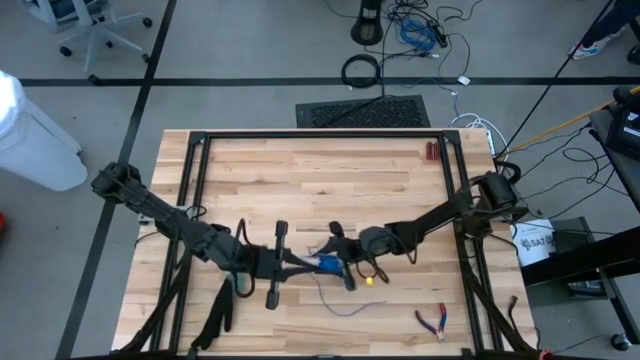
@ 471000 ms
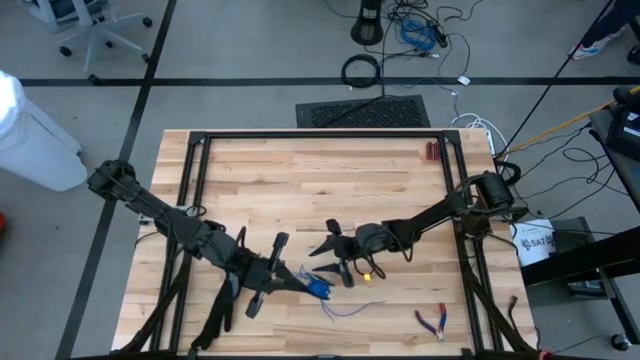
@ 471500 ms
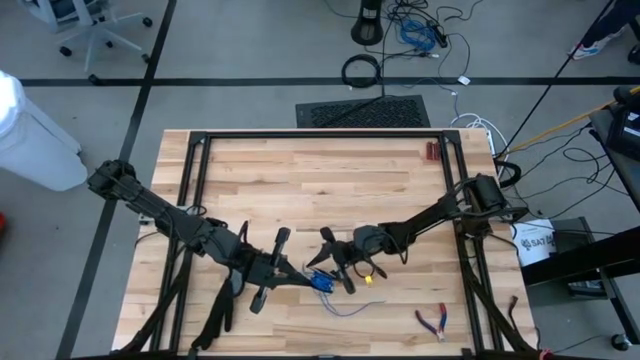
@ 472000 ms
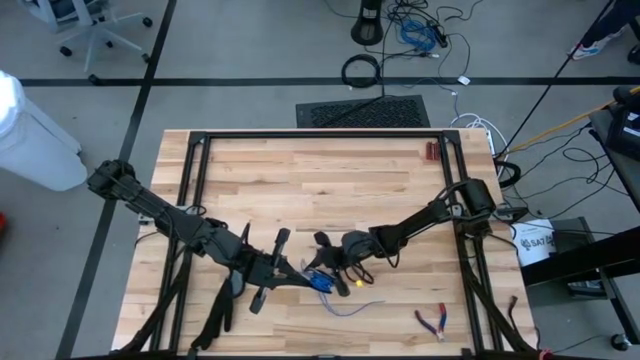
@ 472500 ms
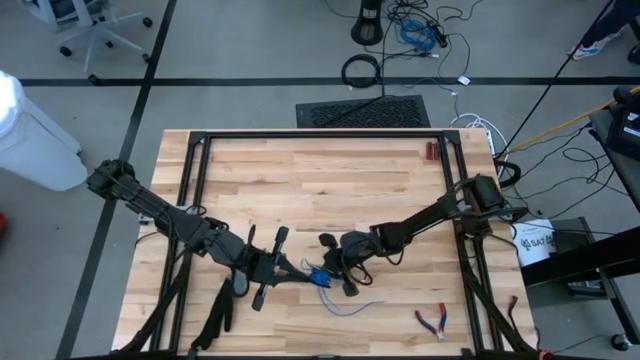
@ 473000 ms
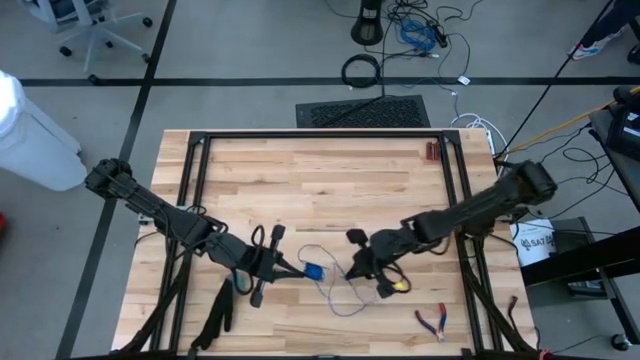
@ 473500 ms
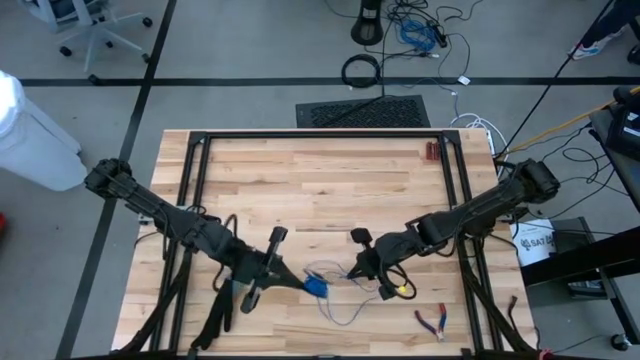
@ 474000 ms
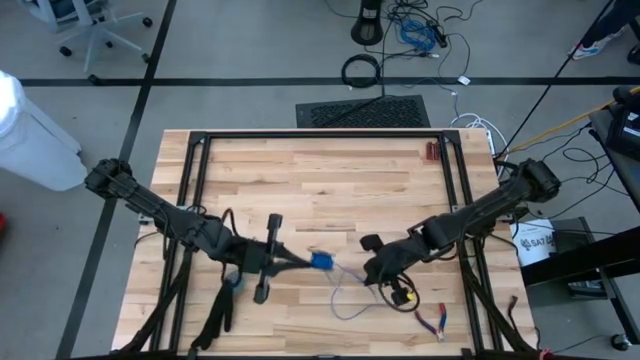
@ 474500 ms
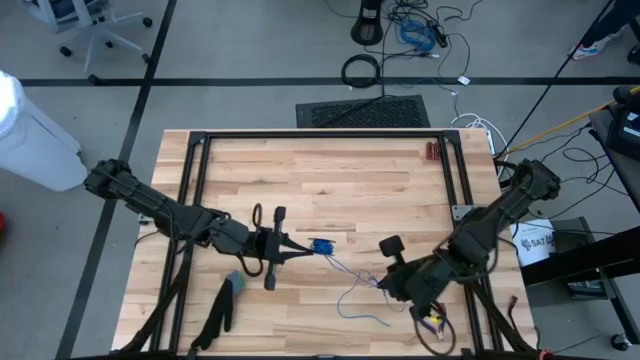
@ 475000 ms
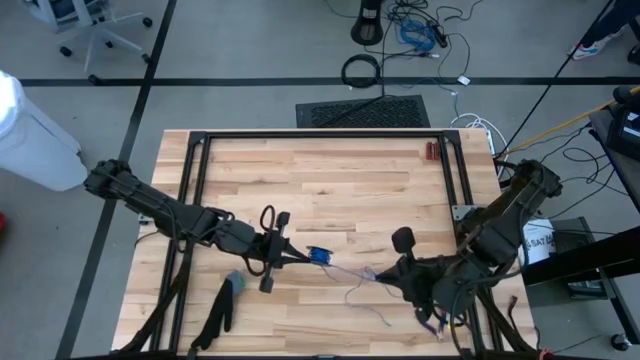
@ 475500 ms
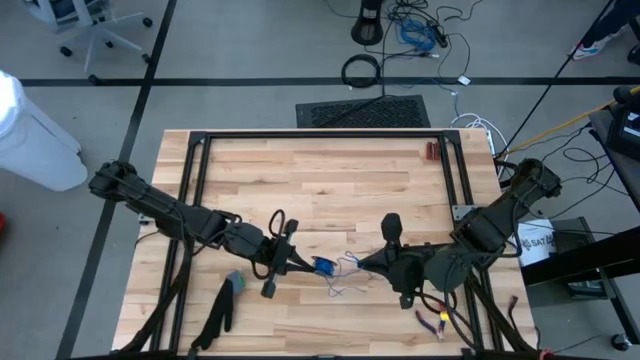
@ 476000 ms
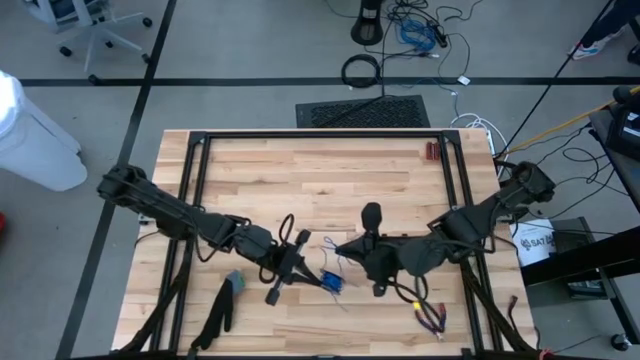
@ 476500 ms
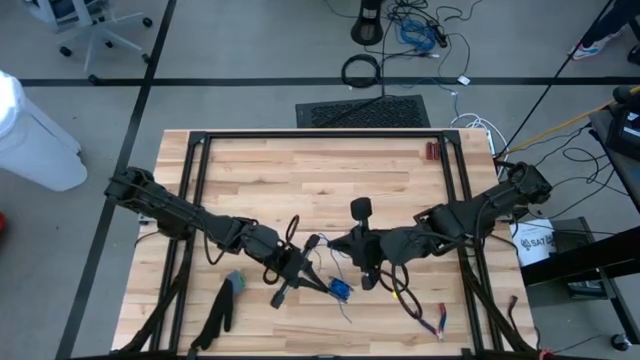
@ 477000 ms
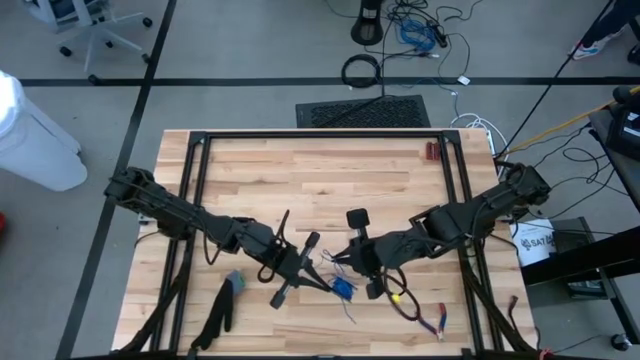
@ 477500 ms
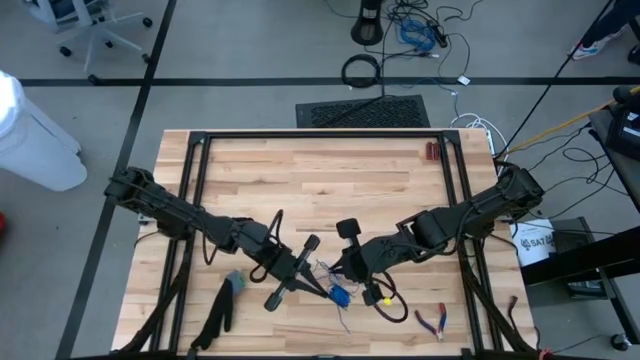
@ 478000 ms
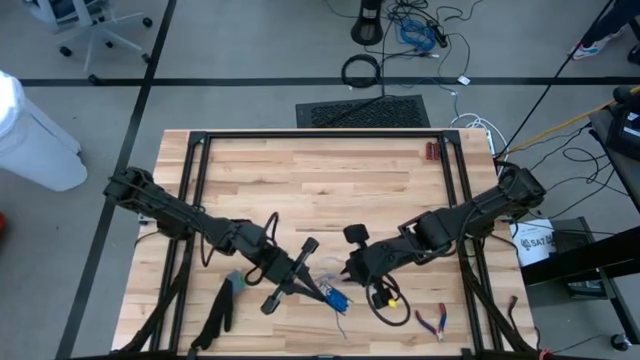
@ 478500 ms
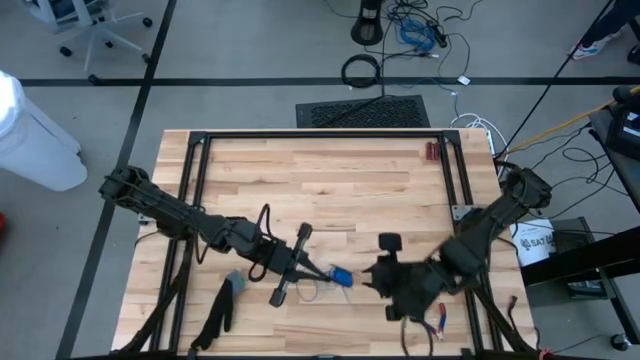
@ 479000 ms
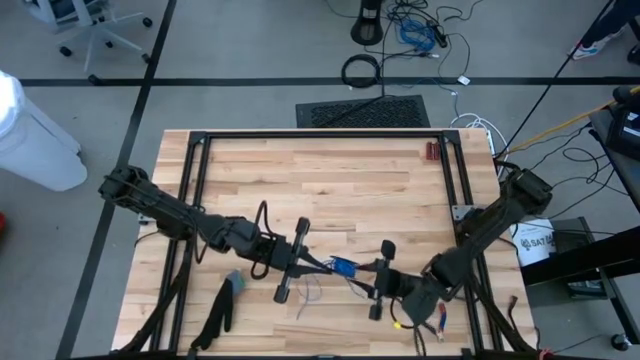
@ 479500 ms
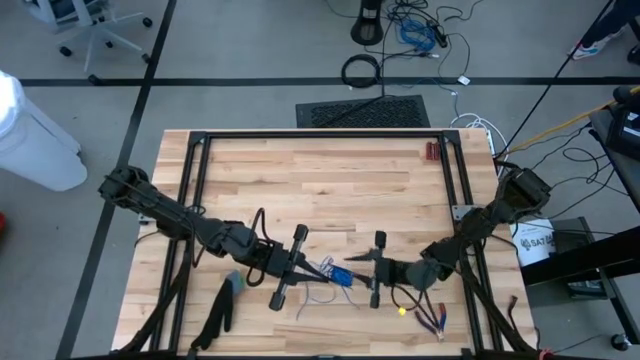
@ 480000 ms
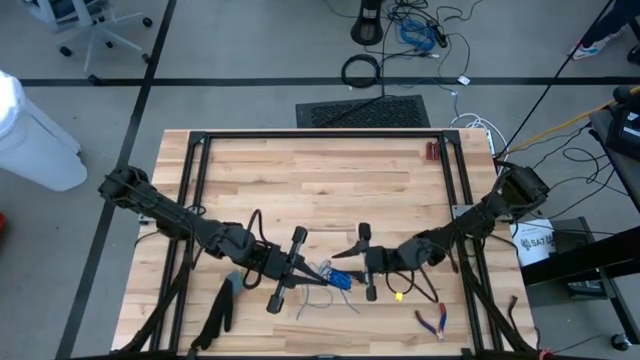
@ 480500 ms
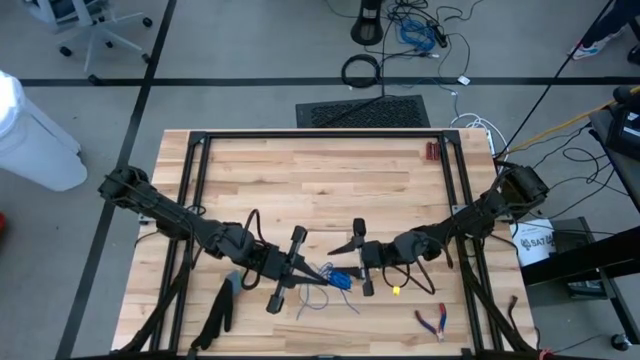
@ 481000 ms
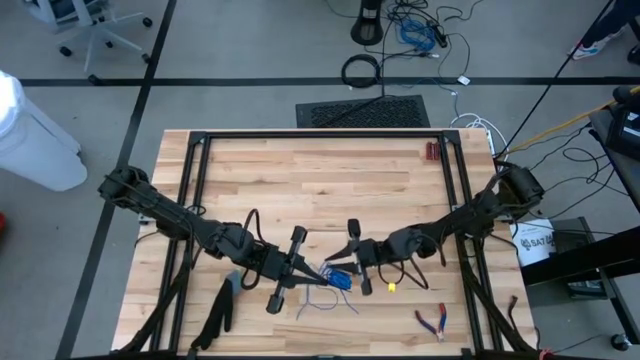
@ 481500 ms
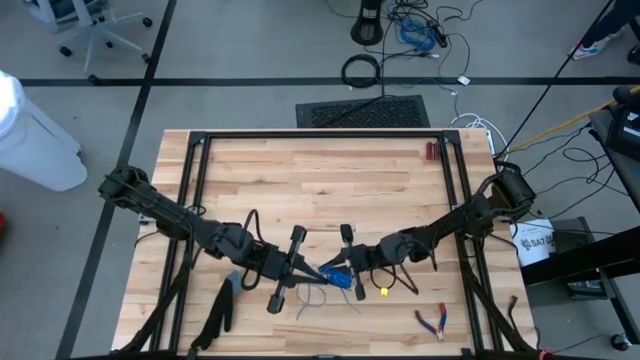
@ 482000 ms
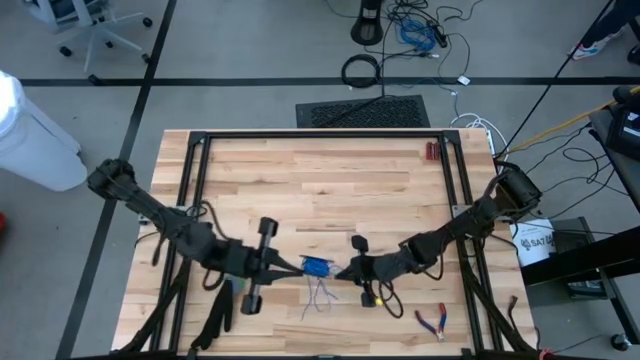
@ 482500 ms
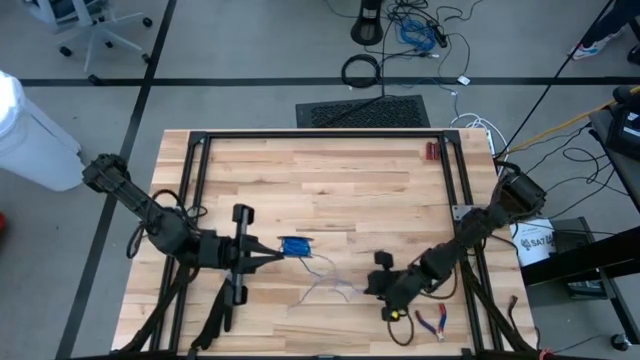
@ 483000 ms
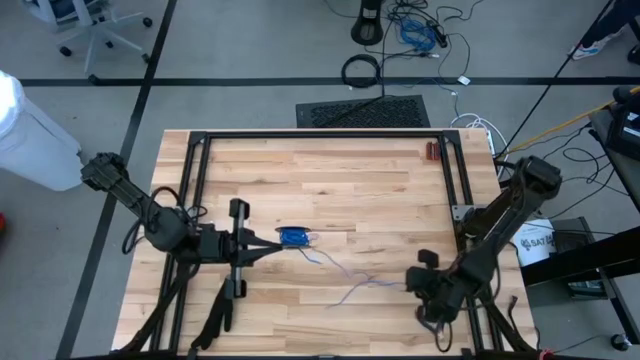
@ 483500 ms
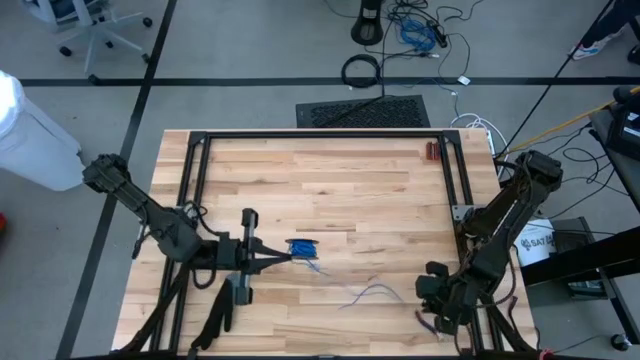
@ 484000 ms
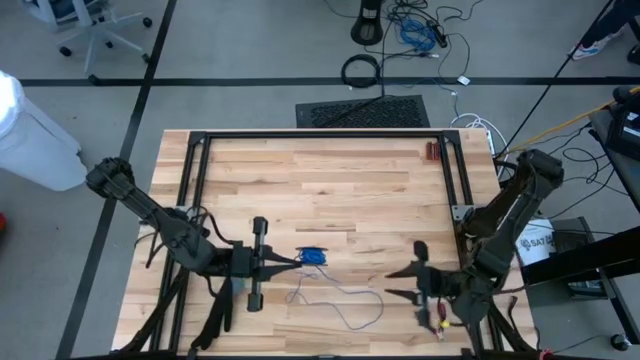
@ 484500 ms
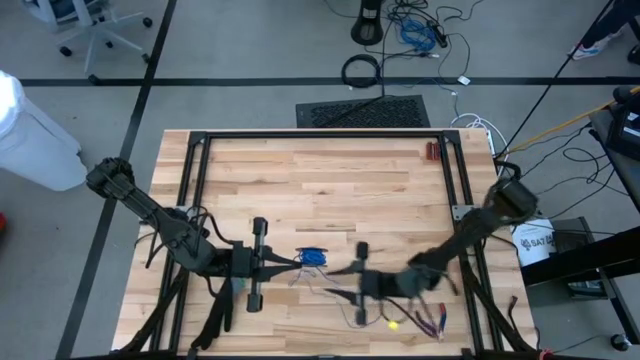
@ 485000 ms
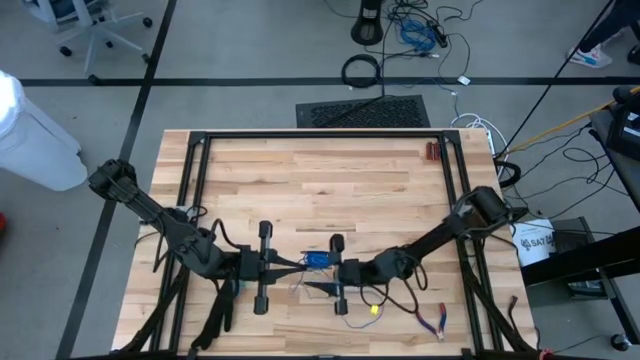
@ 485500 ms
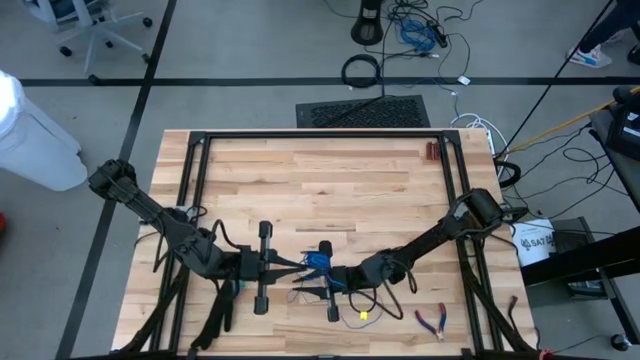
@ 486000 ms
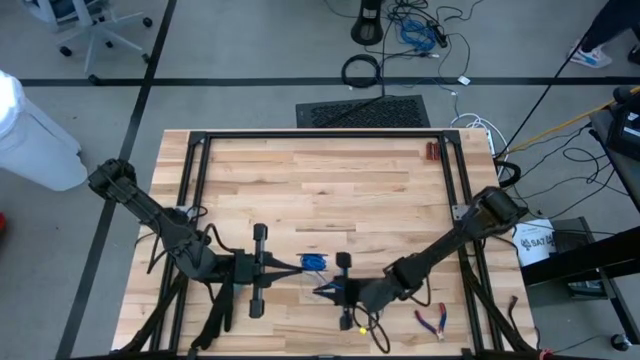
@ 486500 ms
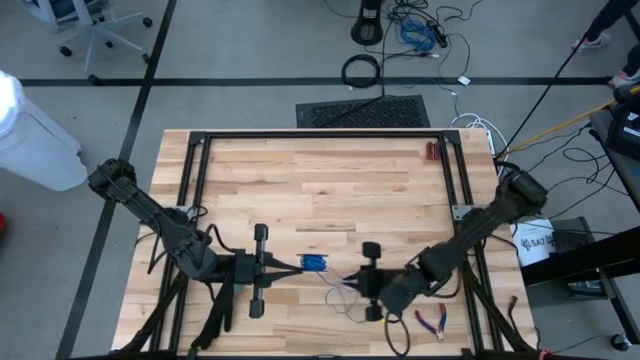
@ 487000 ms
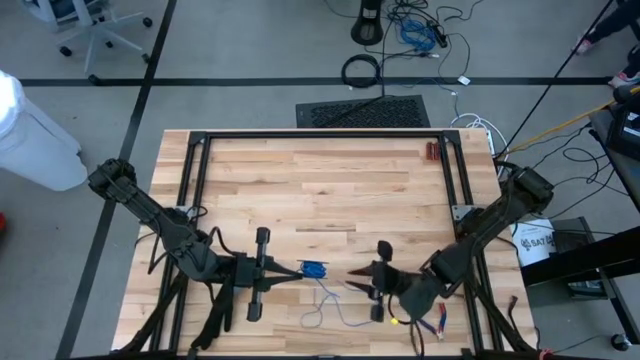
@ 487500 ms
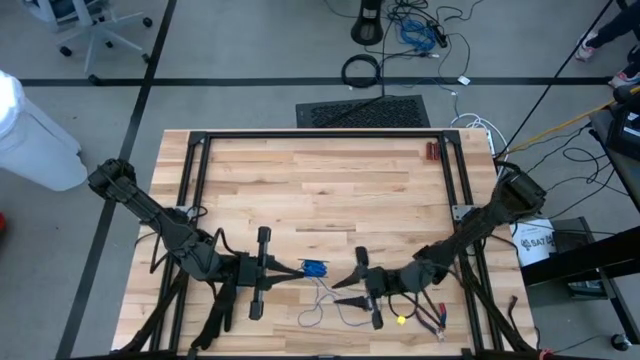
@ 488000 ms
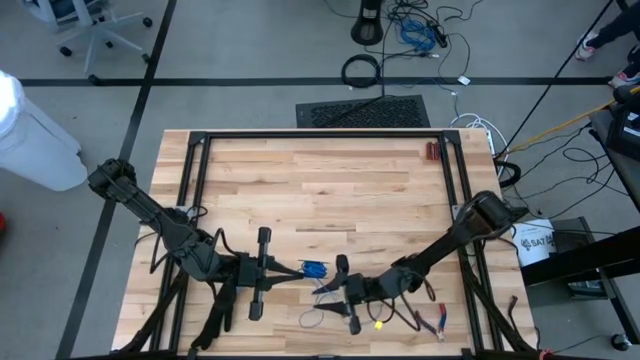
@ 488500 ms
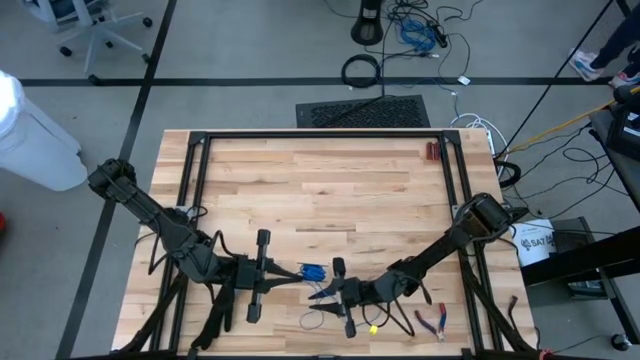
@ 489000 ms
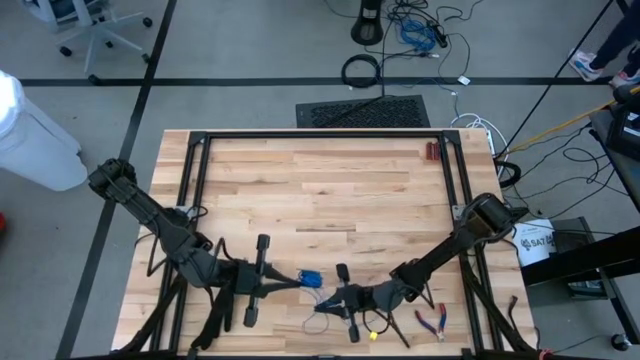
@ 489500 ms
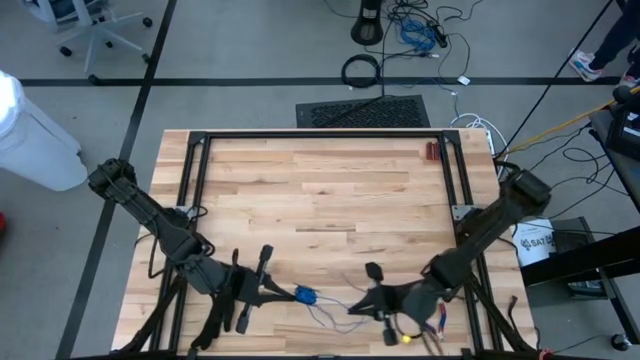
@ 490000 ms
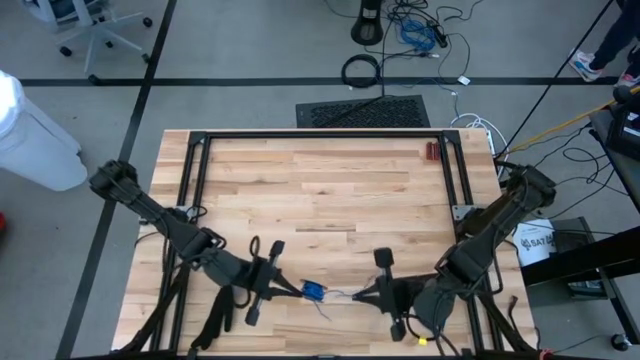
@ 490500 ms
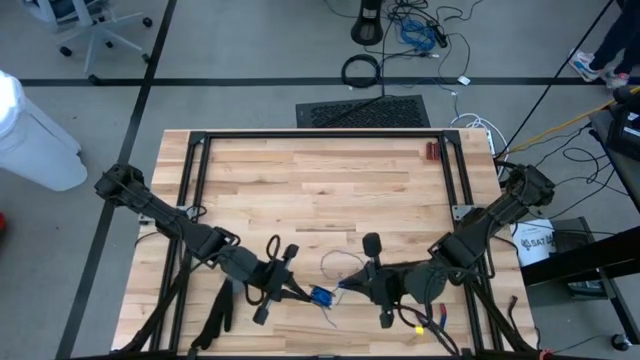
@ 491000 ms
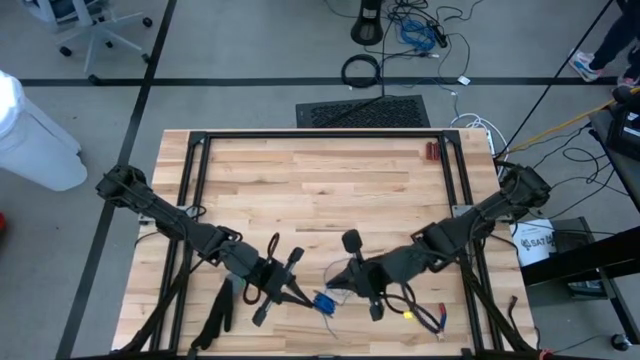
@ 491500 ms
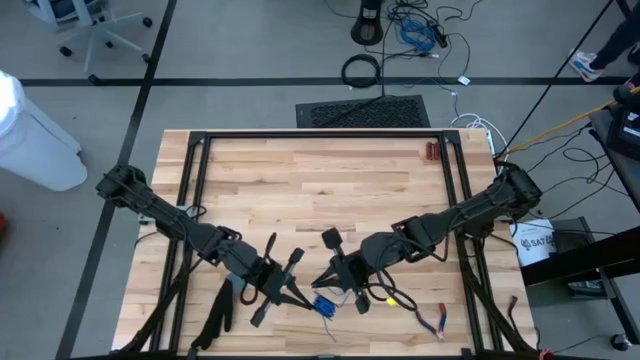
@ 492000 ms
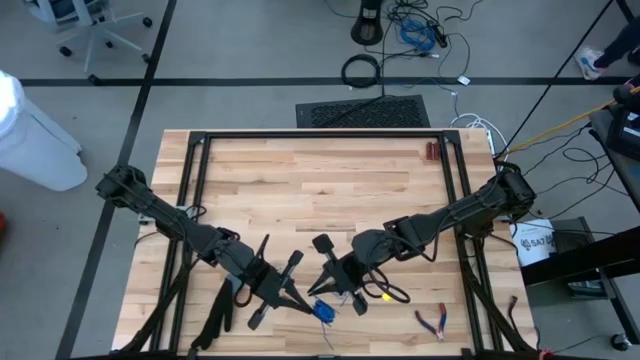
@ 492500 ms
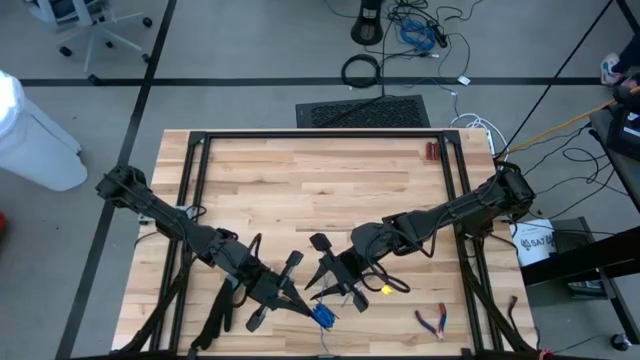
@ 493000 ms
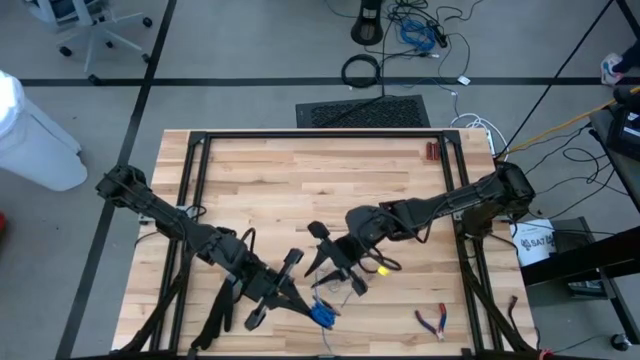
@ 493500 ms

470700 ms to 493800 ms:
Task: Coil cords
Coil the blue wire onto the black spool
